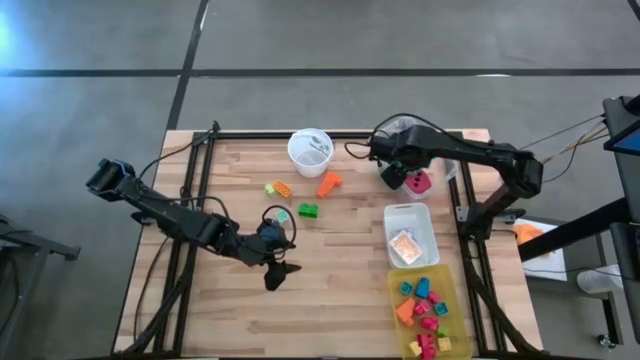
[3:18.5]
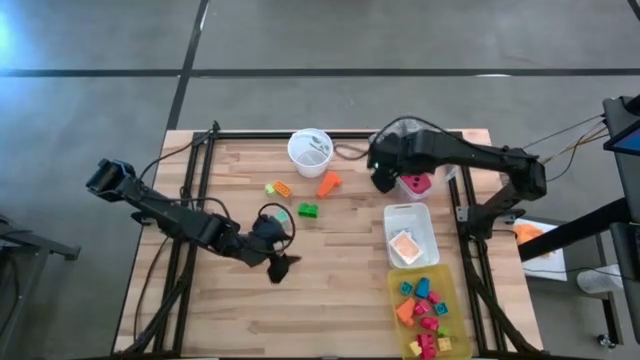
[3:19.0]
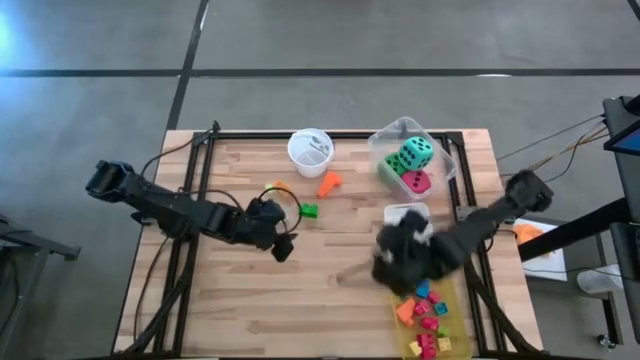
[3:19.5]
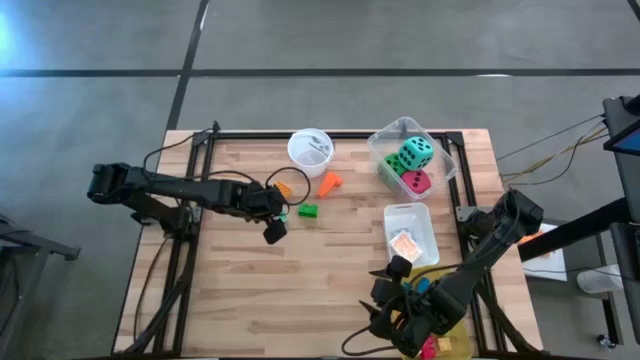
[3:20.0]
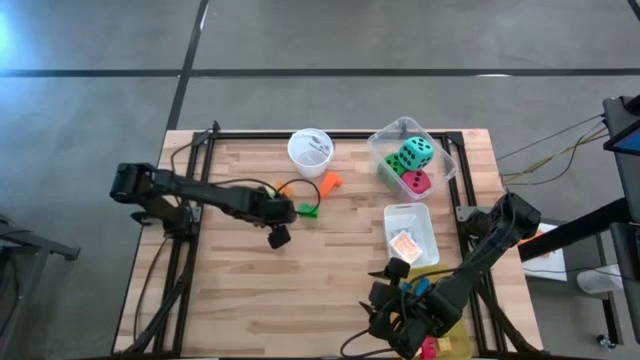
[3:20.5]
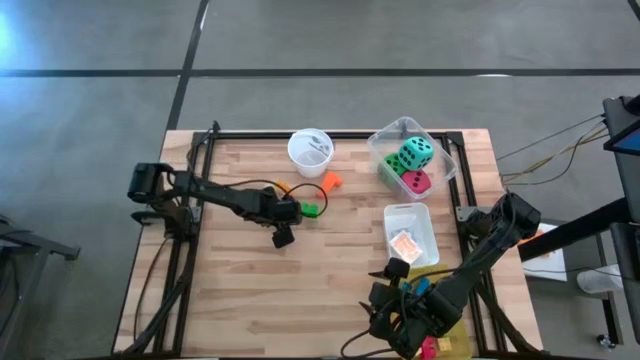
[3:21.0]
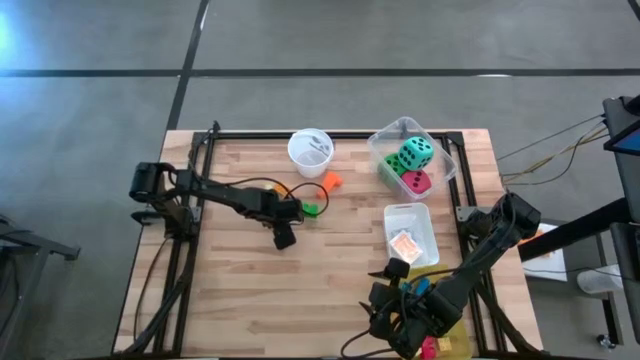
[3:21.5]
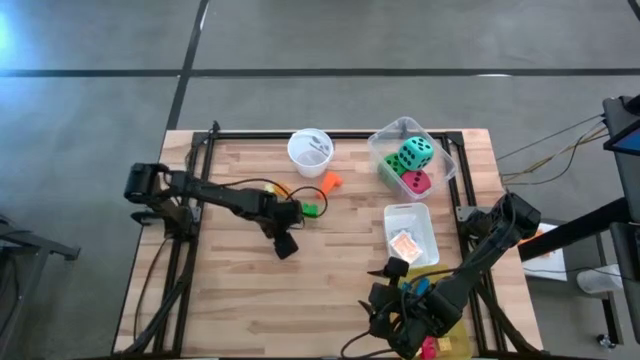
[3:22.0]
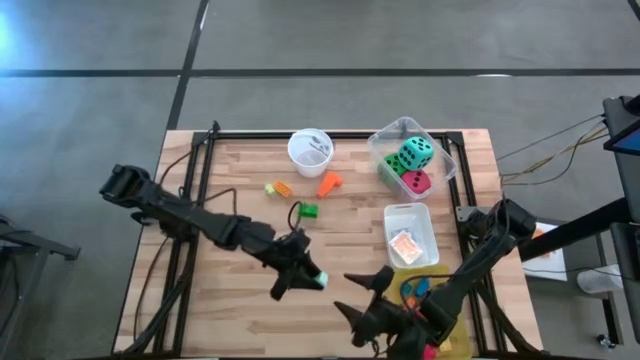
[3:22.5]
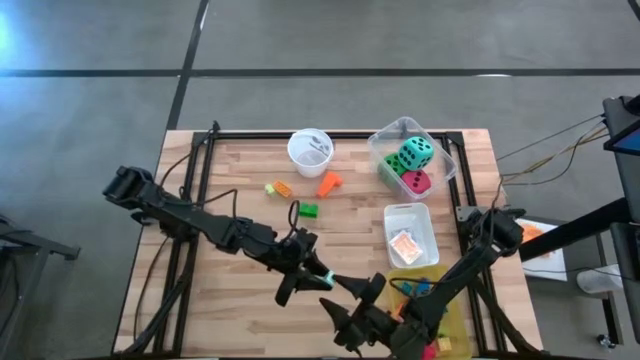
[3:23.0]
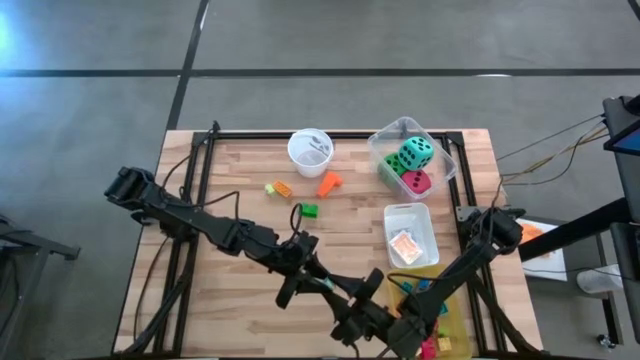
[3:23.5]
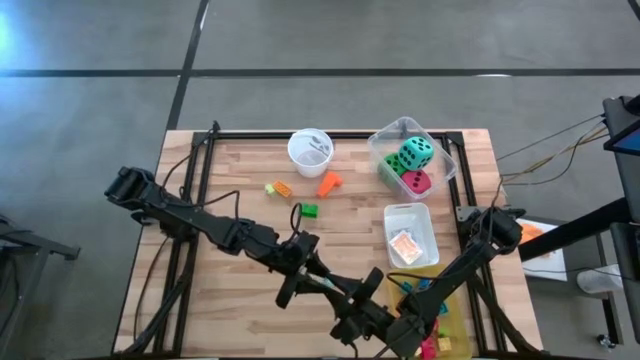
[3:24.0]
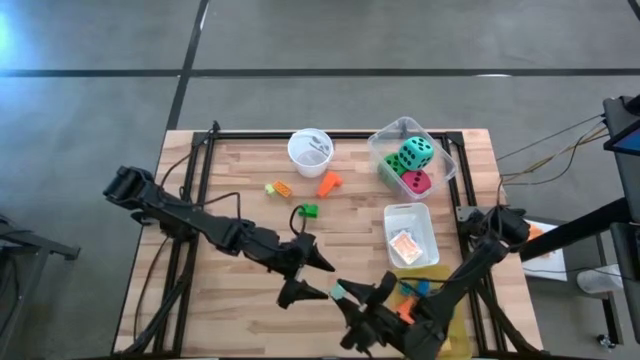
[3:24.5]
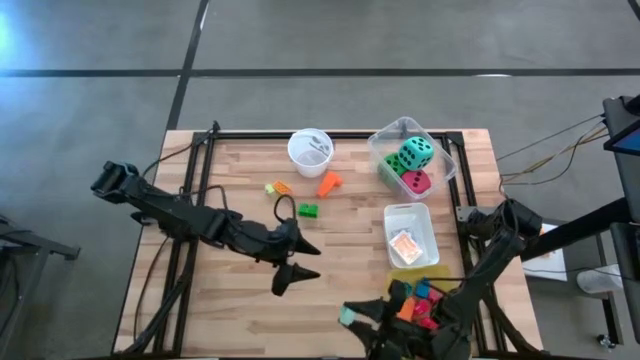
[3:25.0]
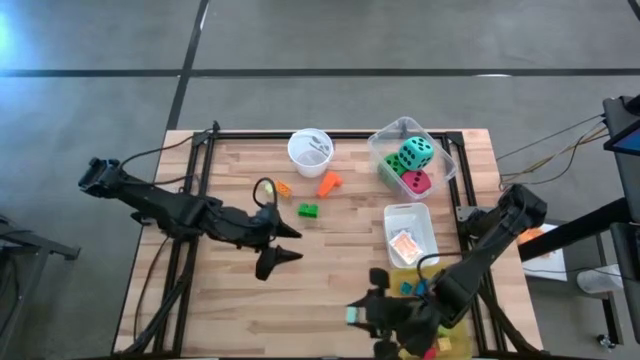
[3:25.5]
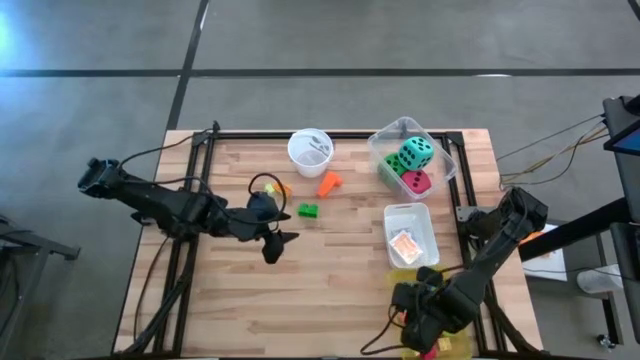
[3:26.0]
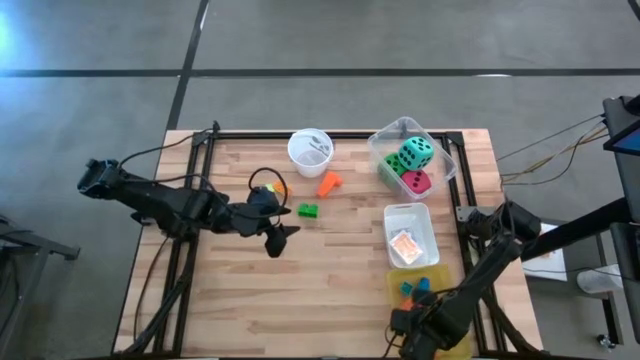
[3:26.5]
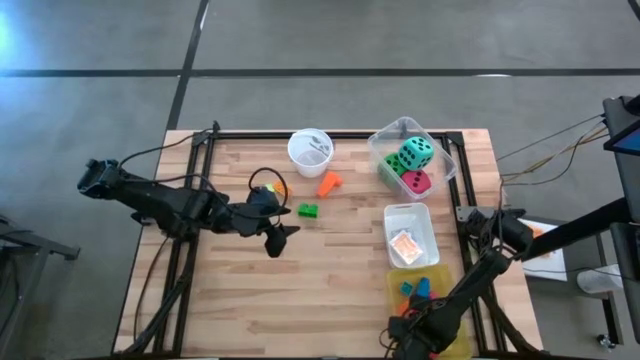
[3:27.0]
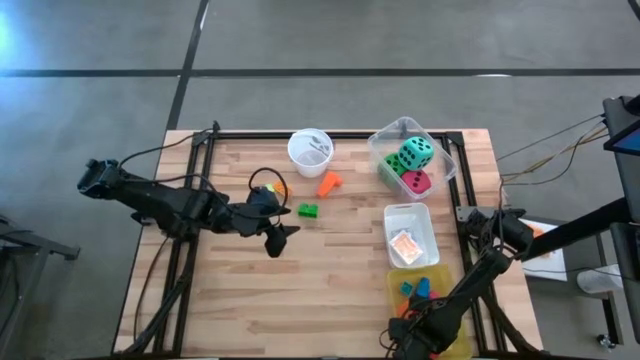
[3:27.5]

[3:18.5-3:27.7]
Task: Pick & Place Toys
Put the light blue game piece into the yellow bin

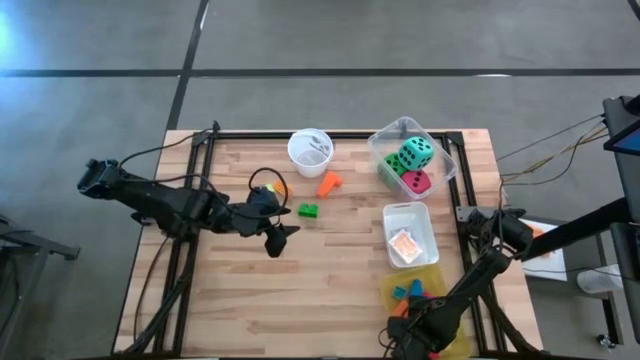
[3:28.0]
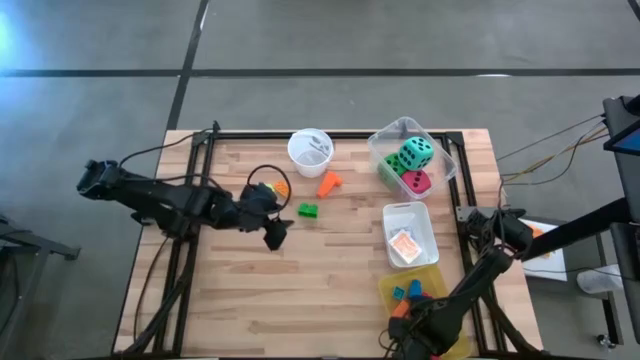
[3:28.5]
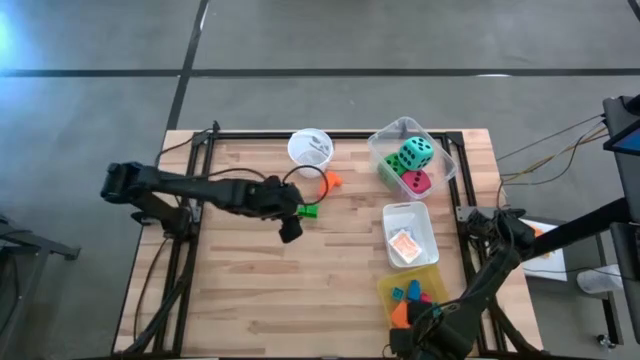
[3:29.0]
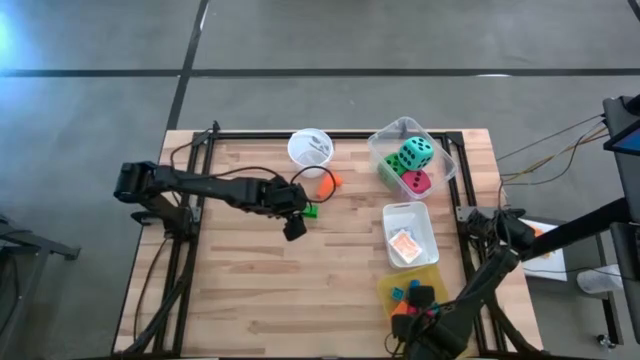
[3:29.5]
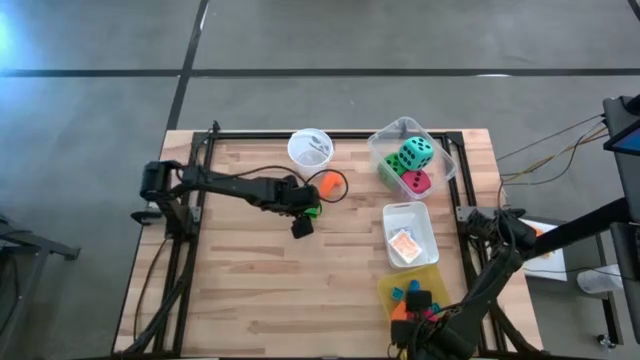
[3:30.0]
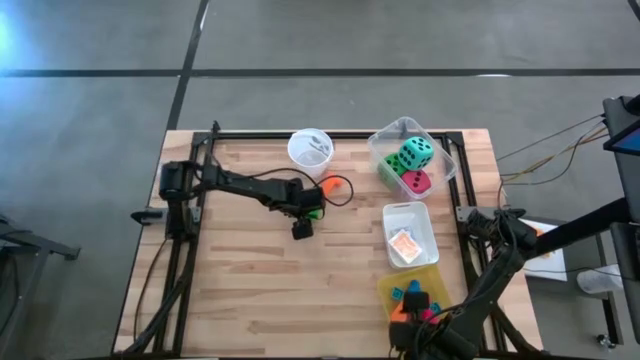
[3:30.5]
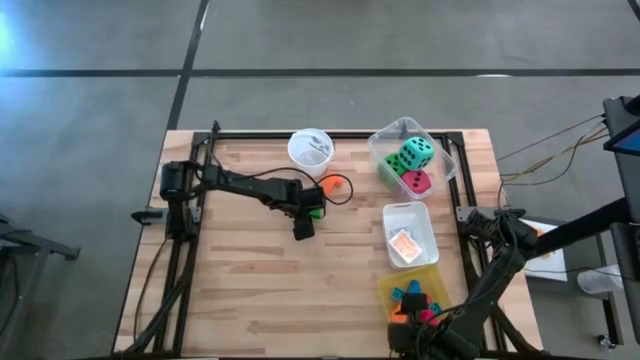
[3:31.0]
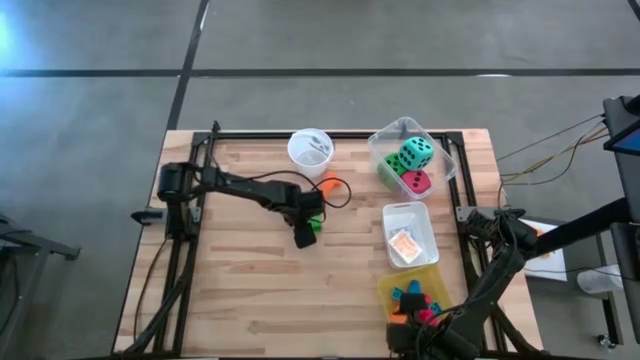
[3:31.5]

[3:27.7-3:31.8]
Put the green game piece into the yellow bin

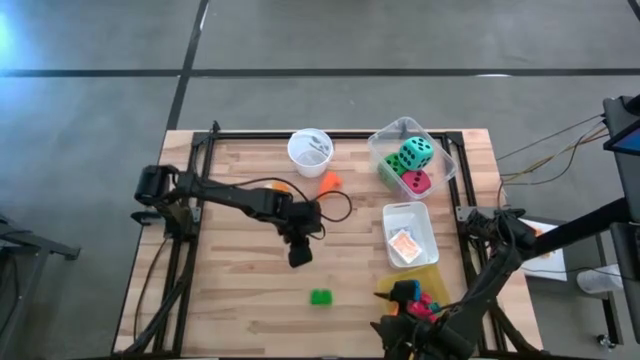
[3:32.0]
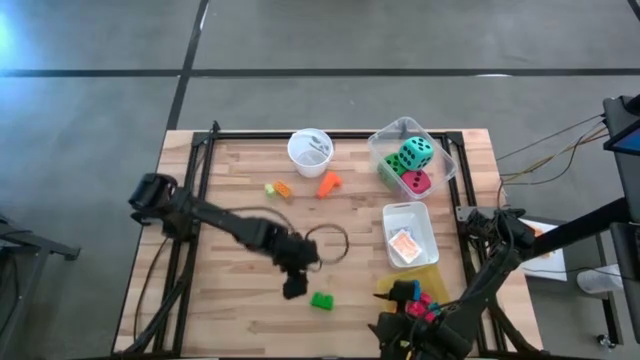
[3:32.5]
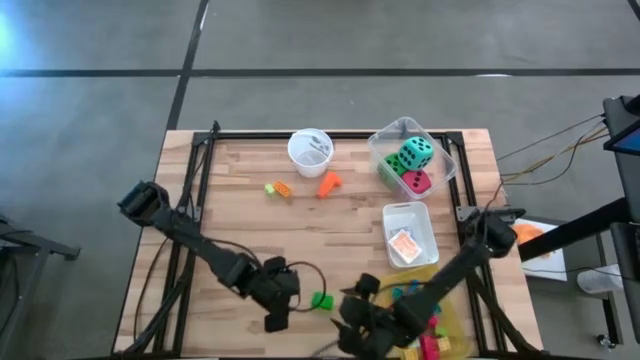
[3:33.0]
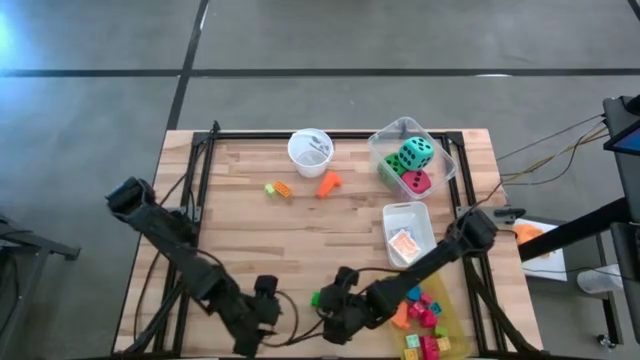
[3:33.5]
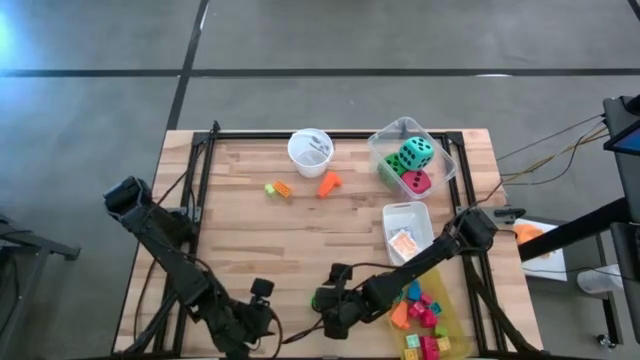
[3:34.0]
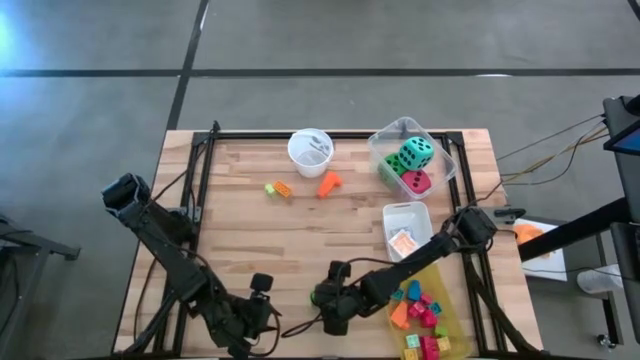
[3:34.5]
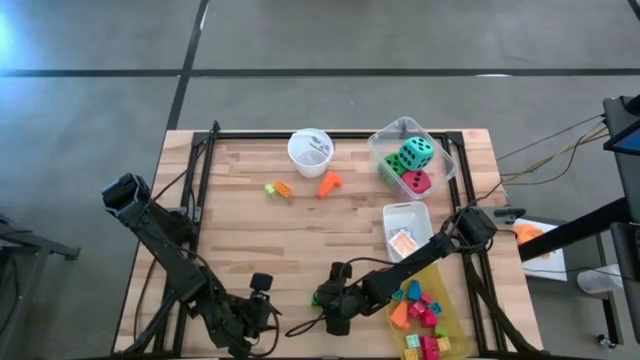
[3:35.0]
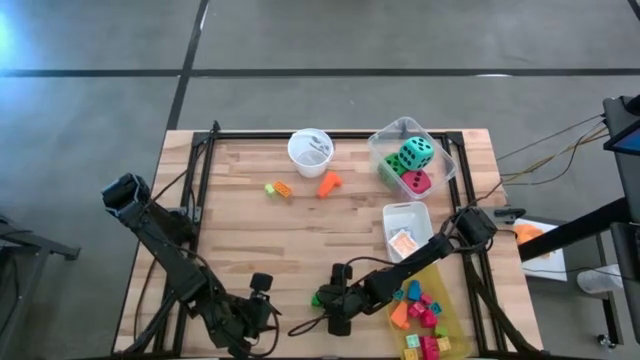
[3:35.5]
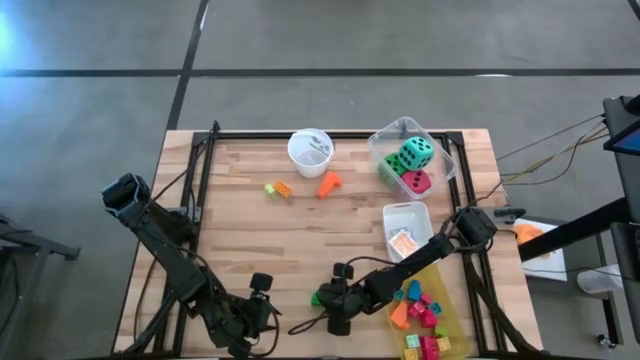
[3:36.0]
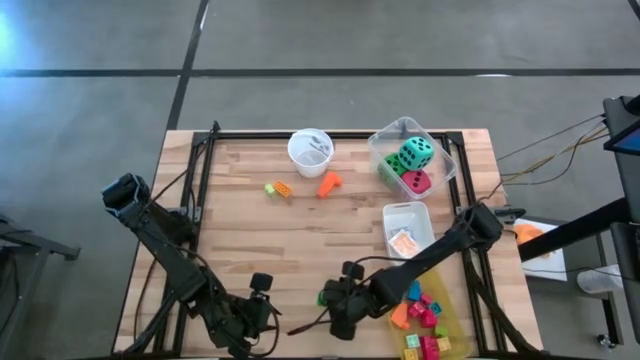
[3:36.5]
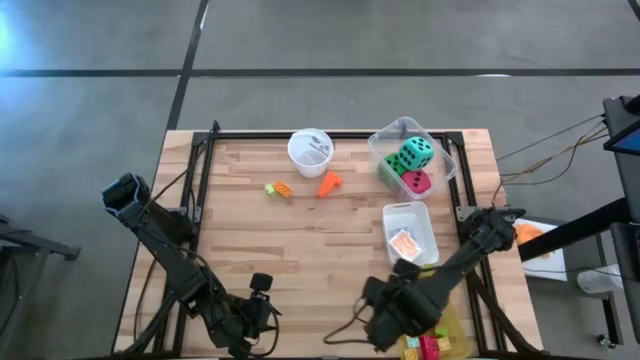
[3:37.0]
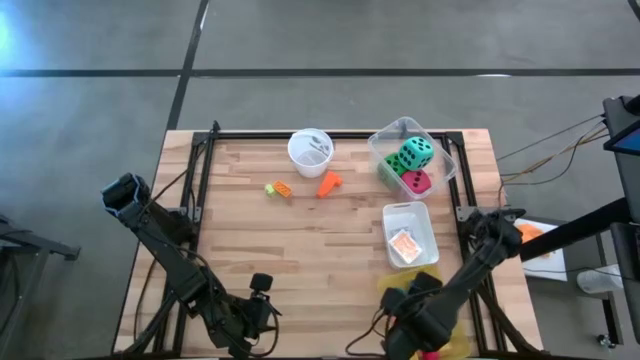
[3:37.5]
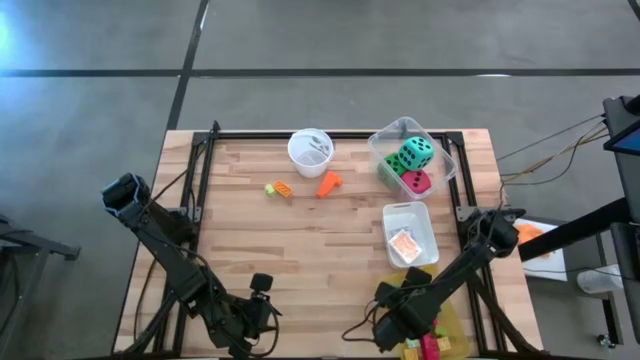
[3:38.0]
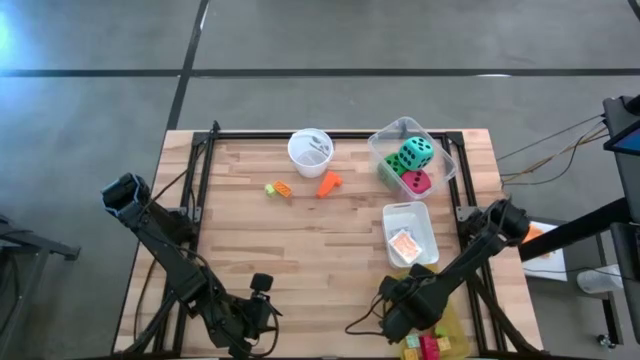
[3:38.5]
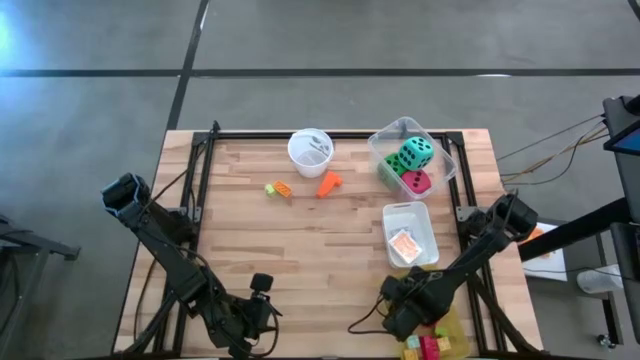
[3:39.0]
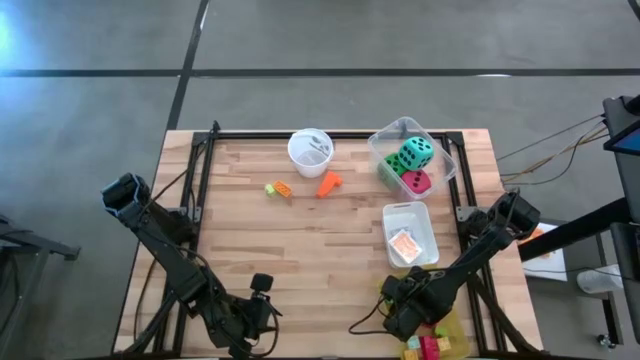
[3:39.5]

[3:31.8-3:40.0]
Put the green game piece into the yellow bin
